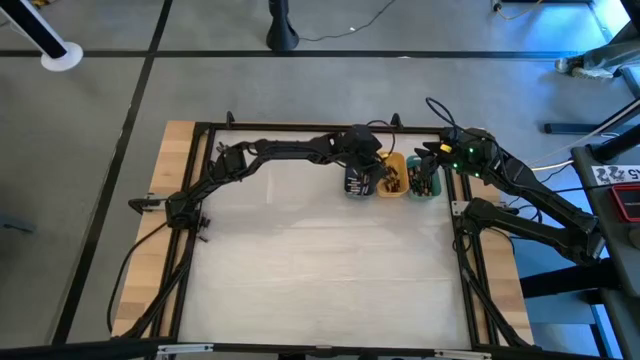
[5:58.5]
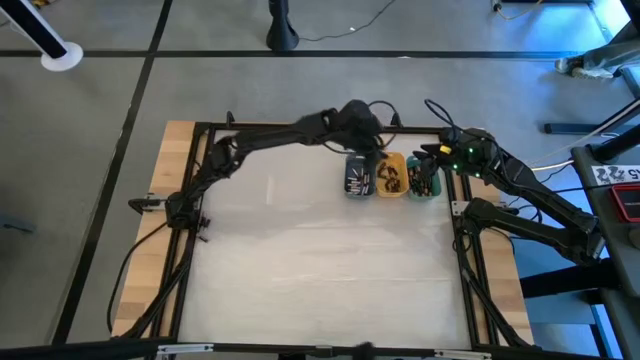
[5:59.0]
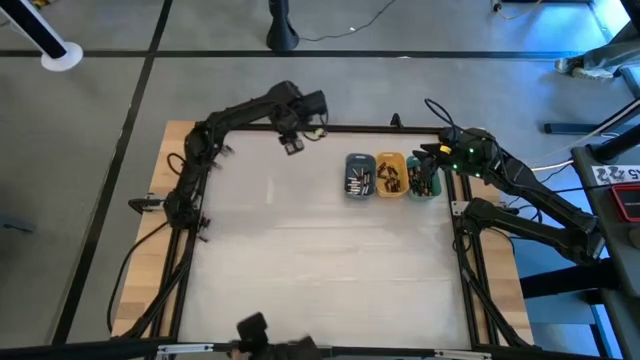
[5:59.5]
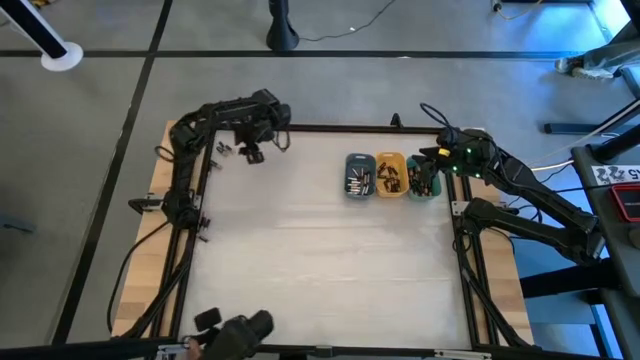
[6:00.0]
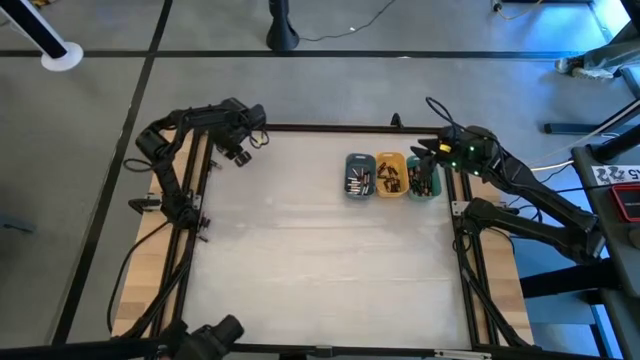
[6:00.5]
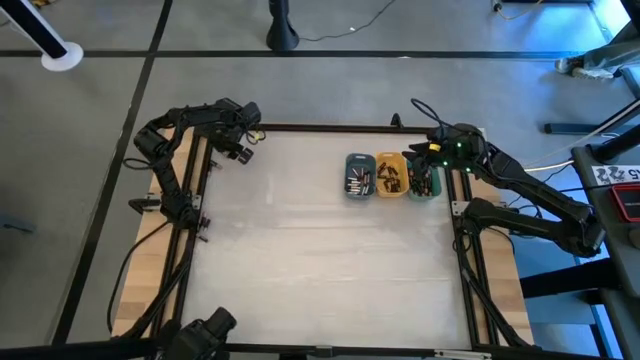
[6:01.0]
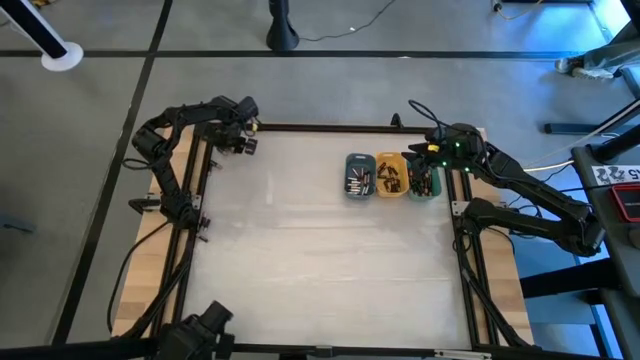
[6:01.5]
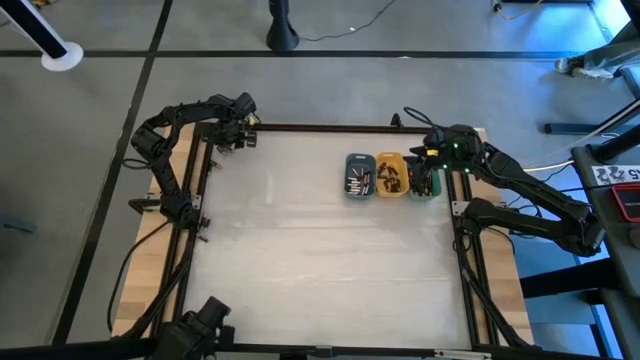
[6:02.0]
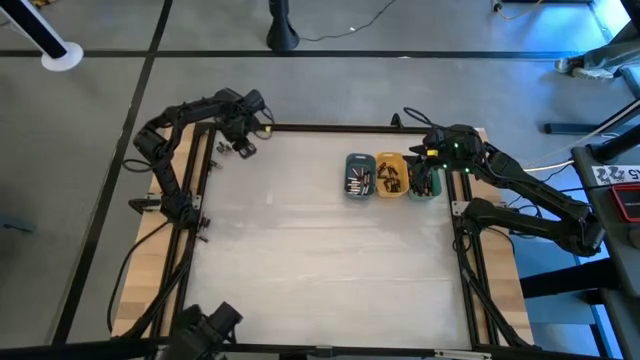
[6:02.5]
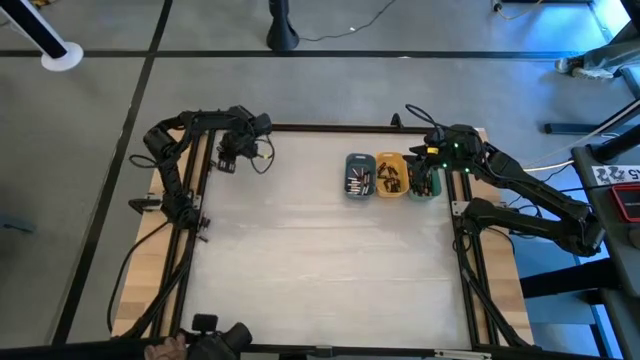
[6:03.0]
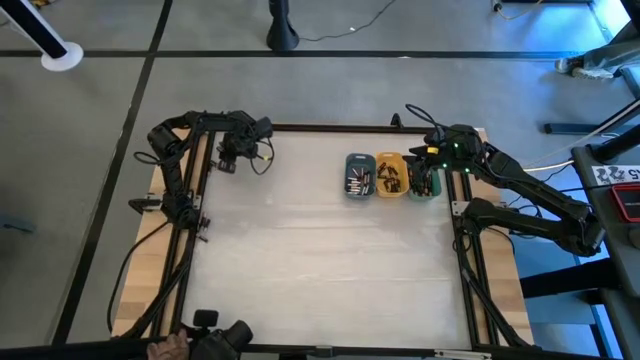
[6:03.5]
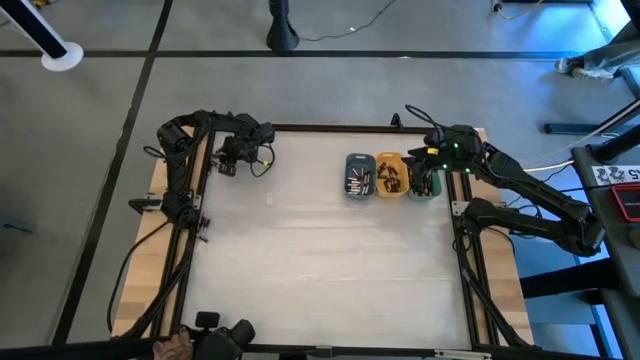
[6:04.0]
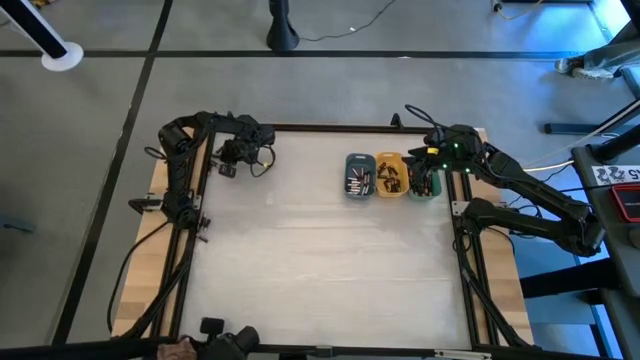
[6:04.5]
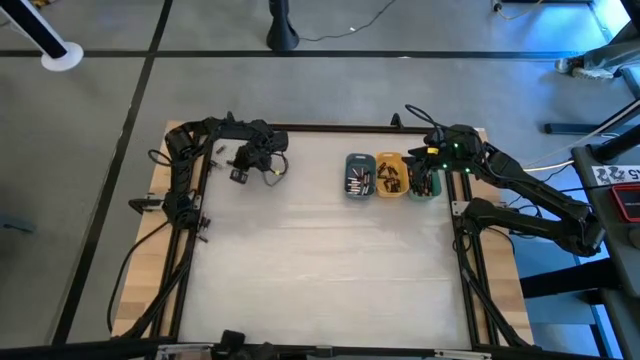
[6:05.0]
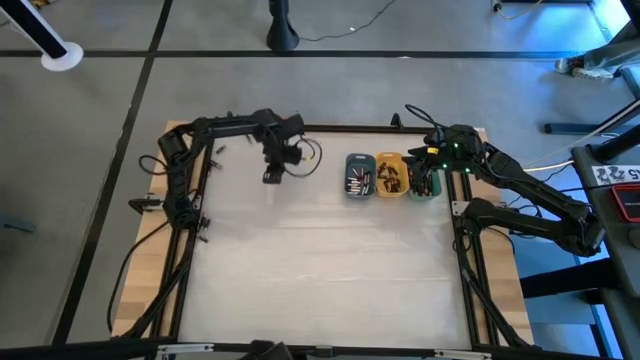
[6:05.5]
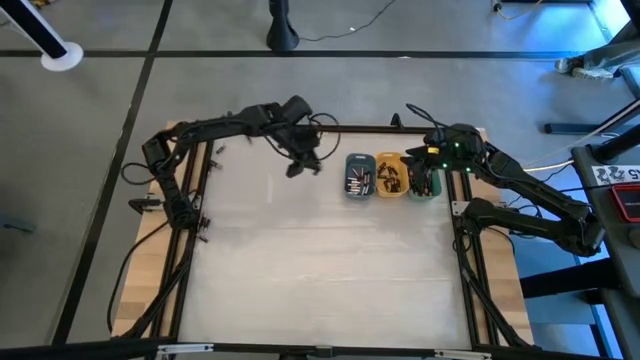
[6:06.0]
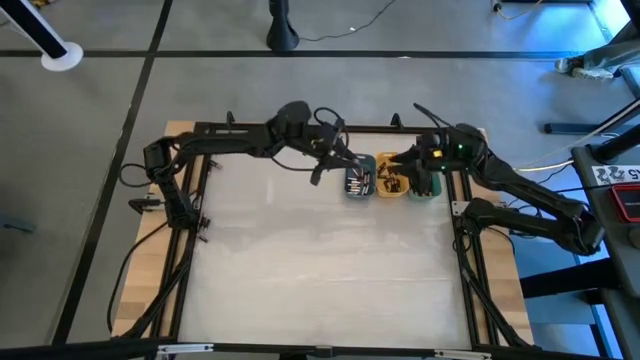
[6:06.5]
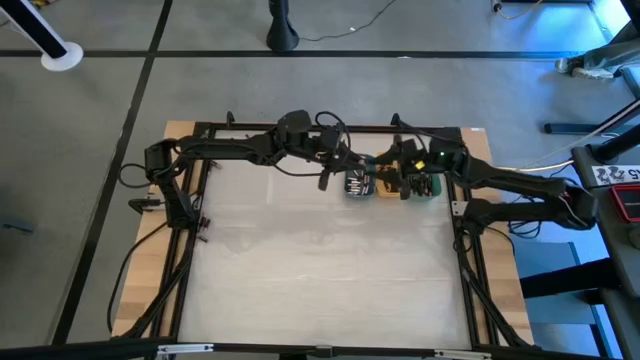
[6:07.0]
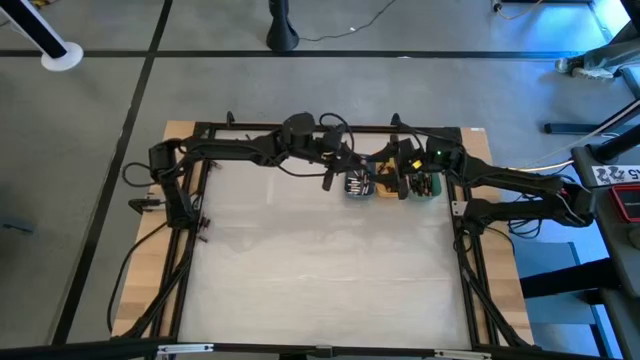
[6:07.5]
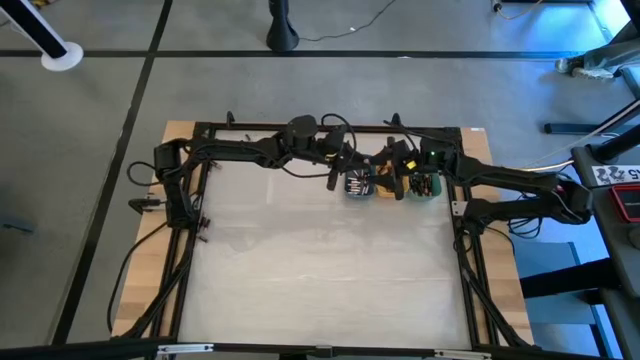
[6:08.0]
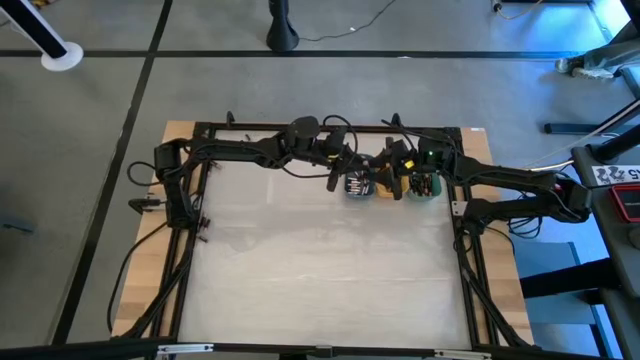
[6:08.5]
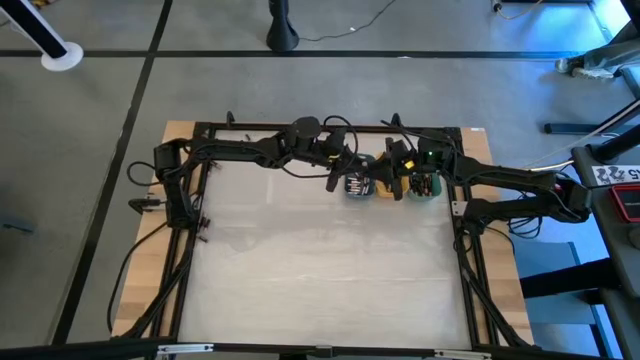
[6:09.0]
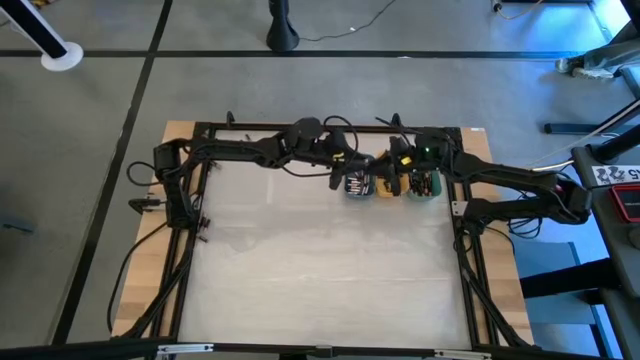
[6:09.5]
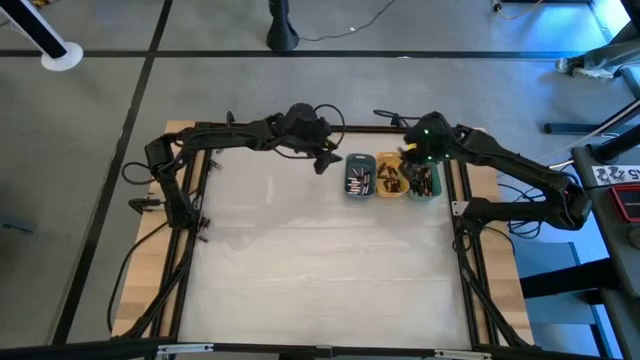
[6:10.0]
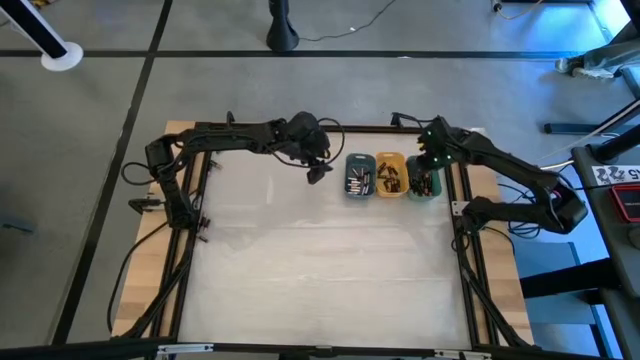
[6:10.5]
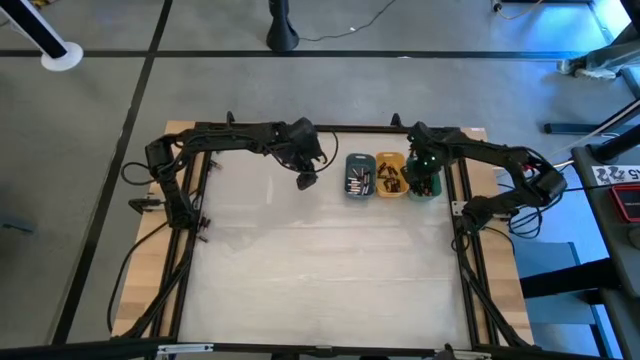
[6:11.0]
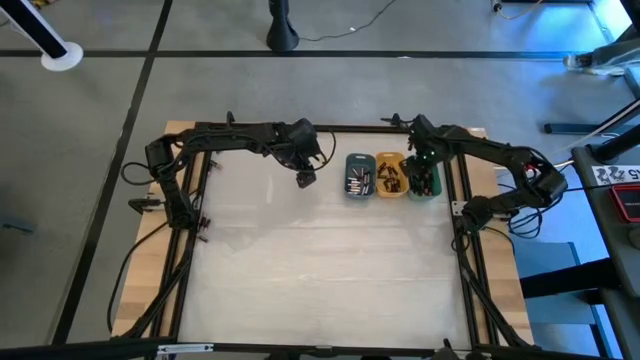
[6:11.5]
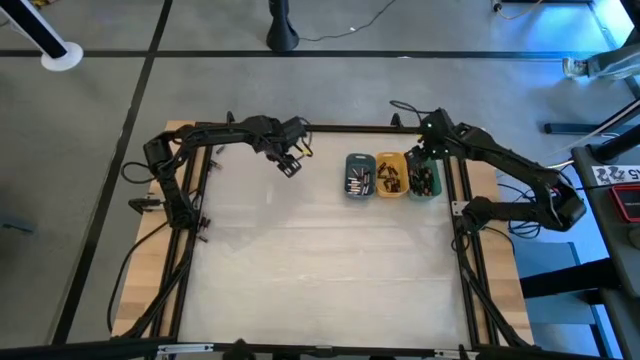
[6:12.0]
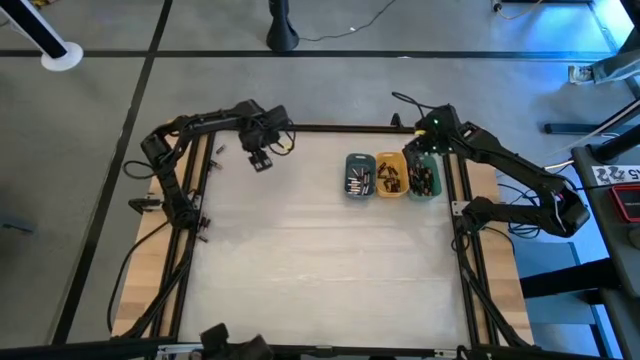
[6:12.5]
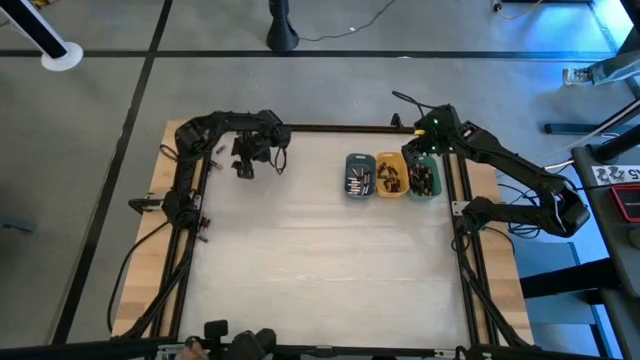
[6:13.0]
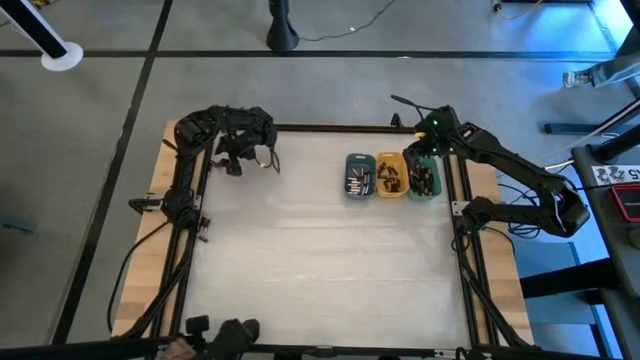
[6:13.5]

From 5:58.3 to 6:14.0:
Task: Sort batteries
Put the black battery into the green bin

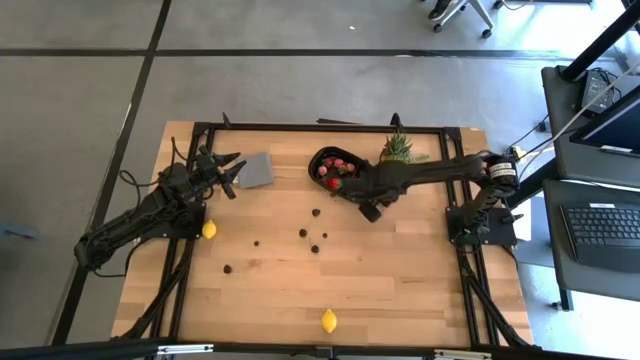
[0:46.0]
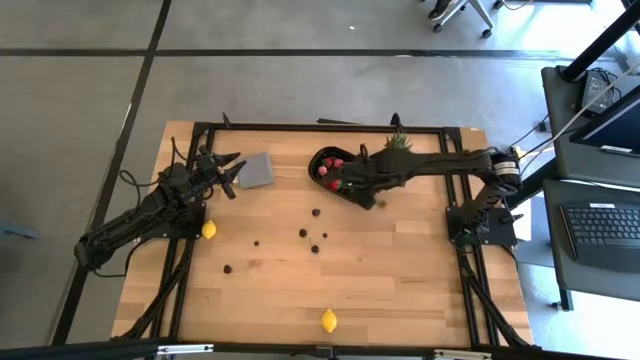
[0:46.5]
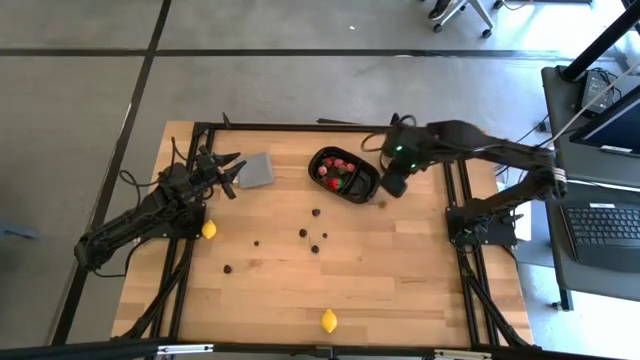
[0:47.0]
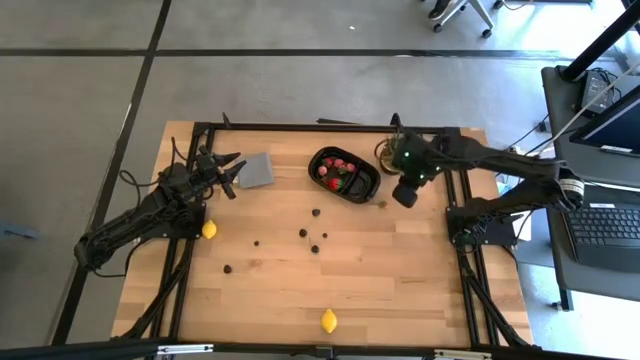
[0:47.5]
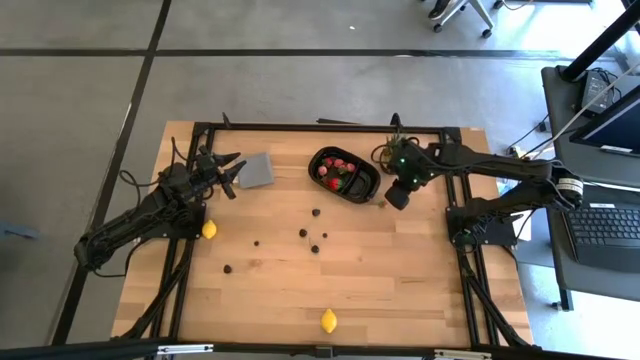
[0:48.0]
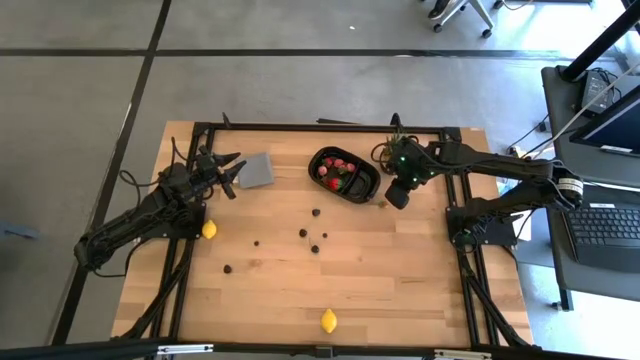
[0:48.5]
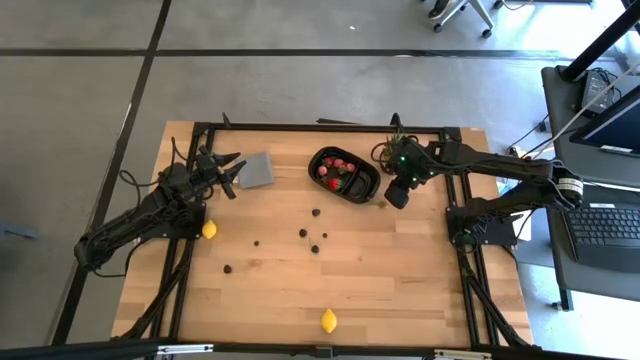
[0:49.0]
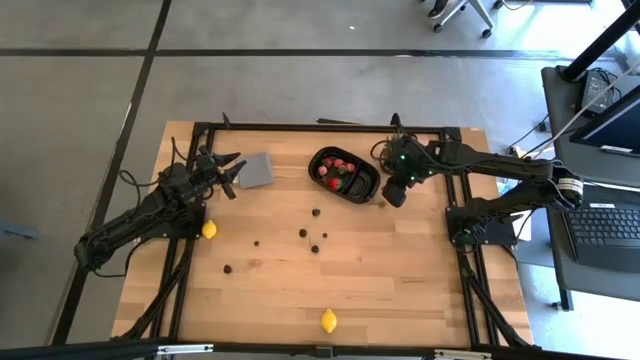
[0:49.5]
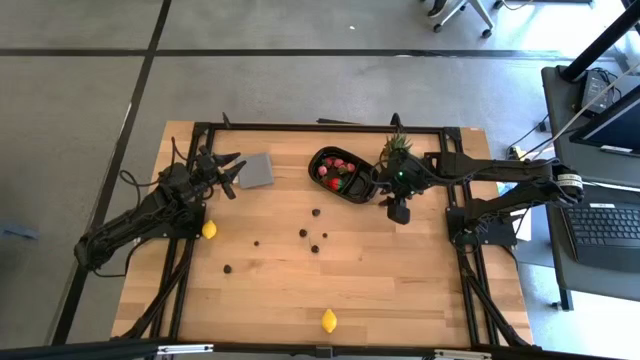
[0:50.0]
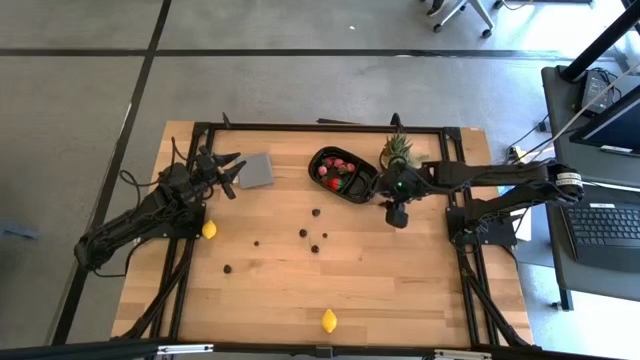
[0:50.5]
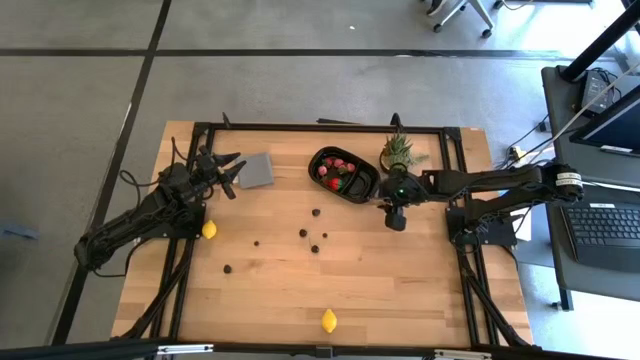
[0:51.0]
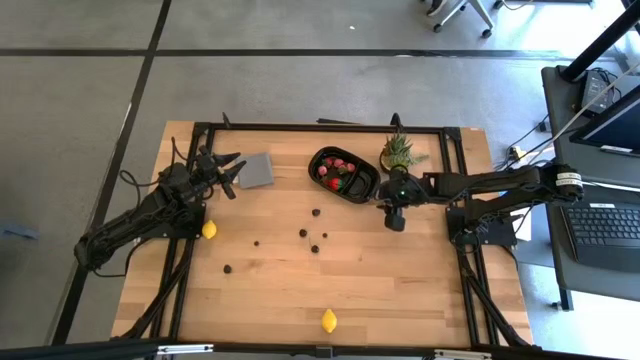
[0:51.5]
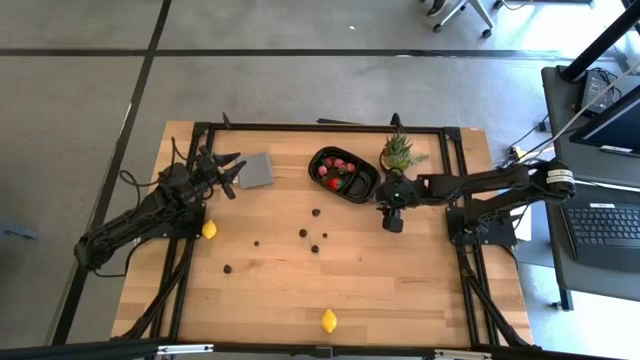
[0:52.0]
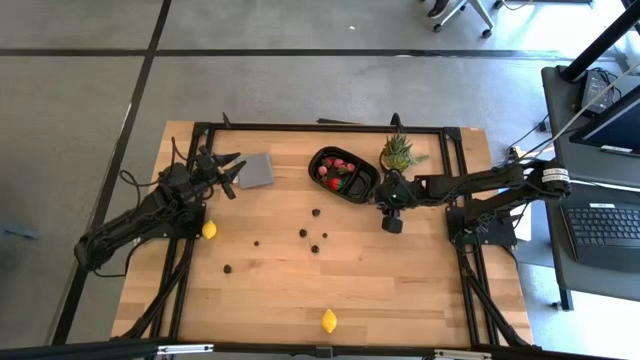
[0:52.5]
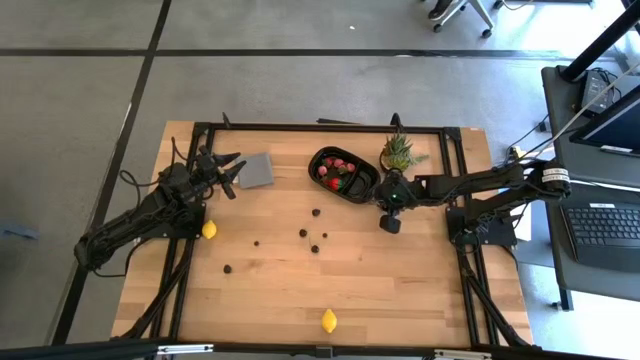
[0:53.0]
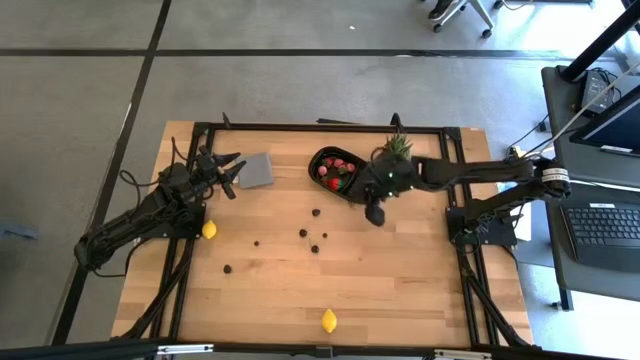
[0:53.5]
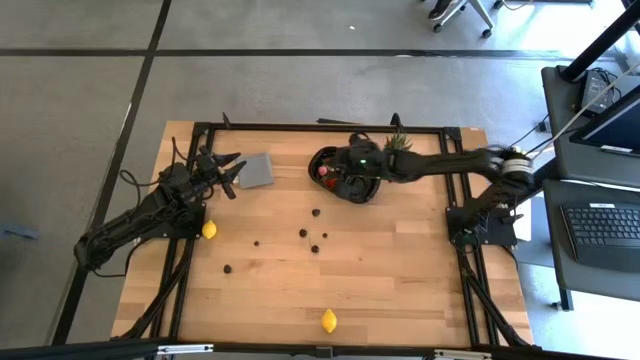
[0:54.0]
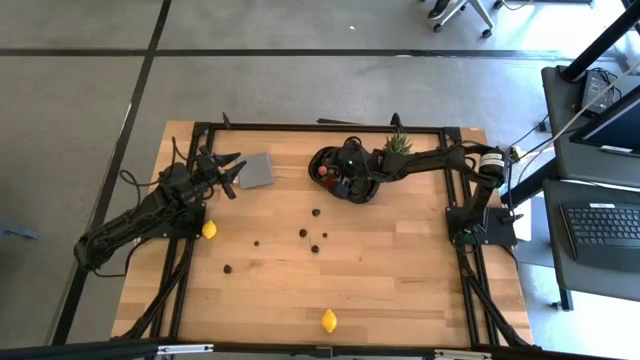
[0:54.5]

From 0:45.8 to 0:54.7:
Task: Pick and placing Produce into tupperware
Put the strawberry into the black bin
